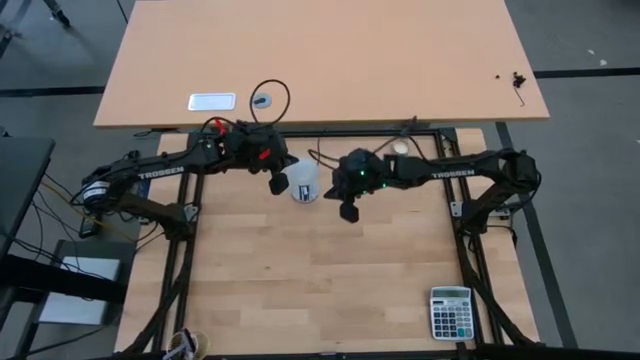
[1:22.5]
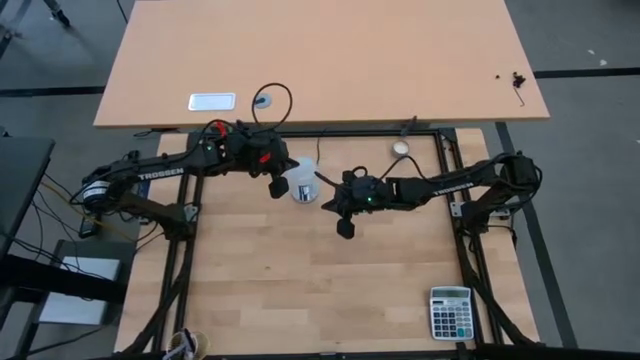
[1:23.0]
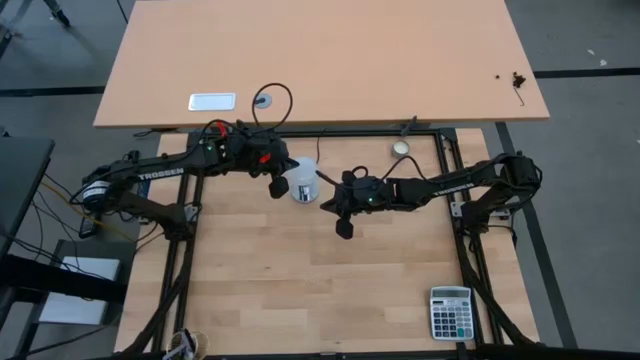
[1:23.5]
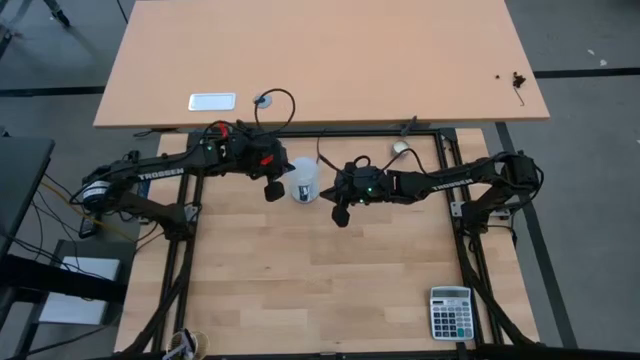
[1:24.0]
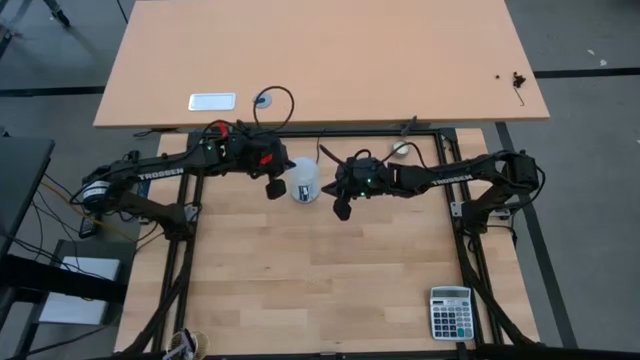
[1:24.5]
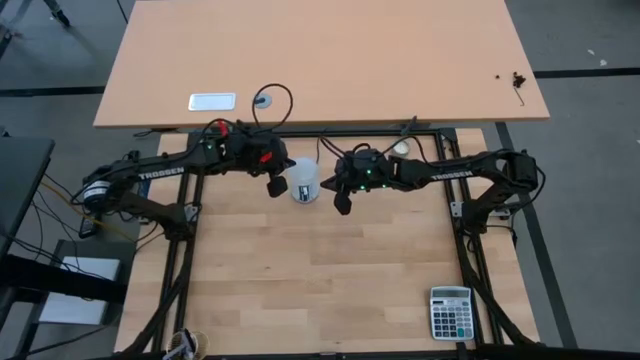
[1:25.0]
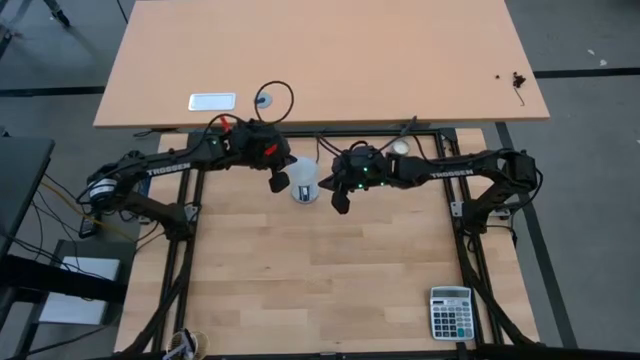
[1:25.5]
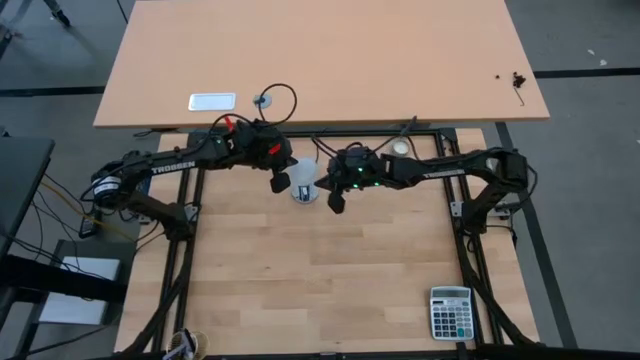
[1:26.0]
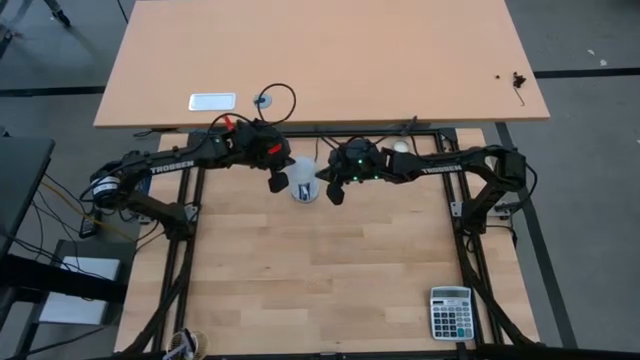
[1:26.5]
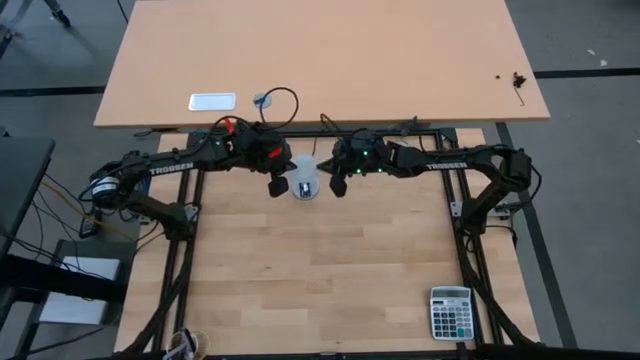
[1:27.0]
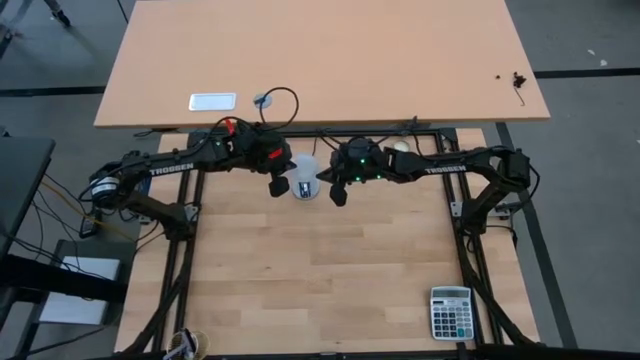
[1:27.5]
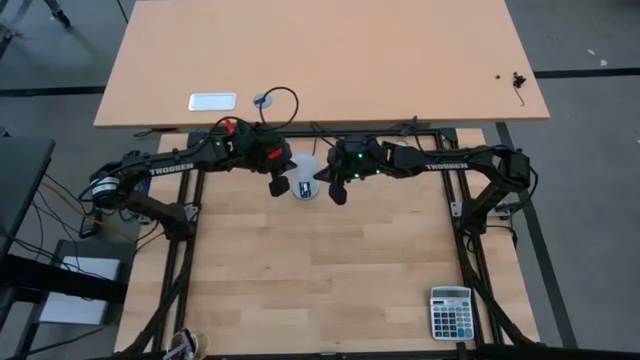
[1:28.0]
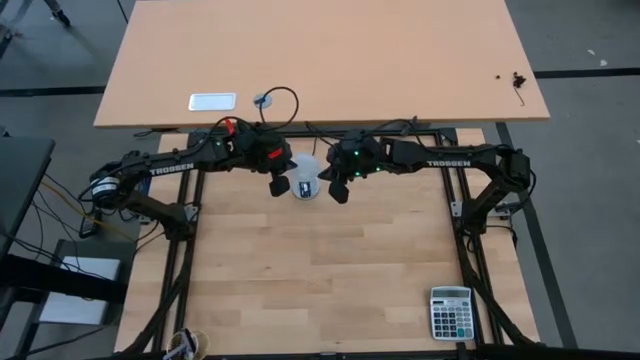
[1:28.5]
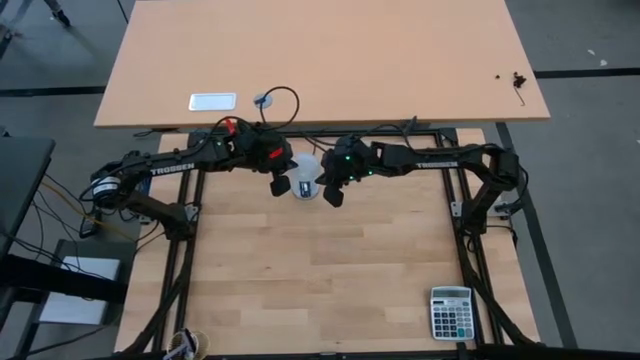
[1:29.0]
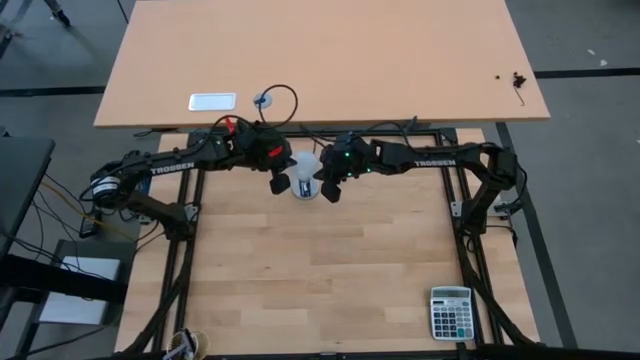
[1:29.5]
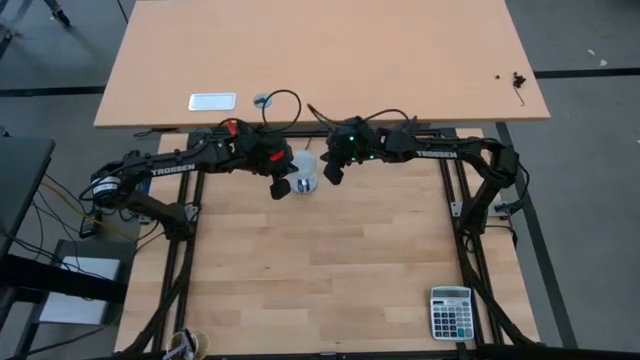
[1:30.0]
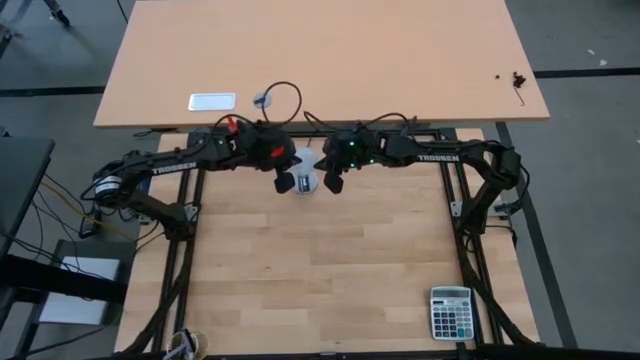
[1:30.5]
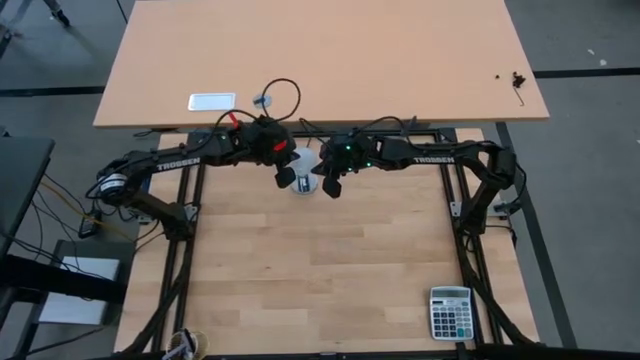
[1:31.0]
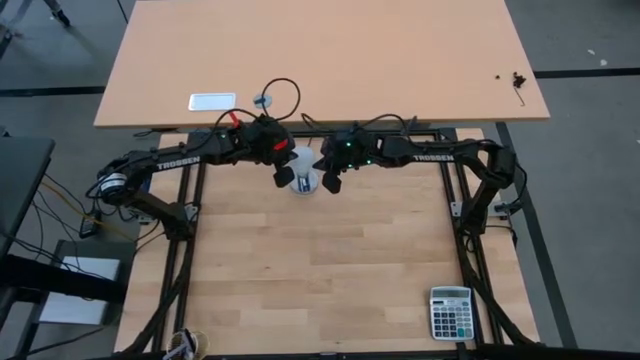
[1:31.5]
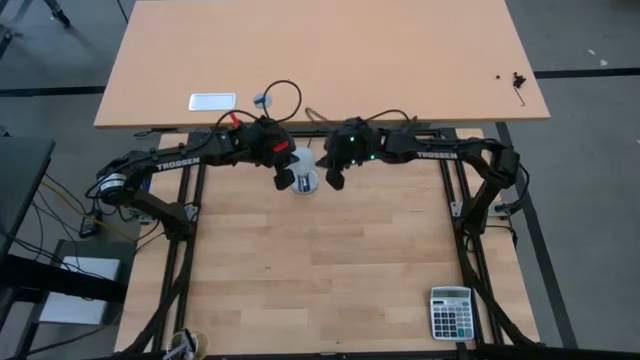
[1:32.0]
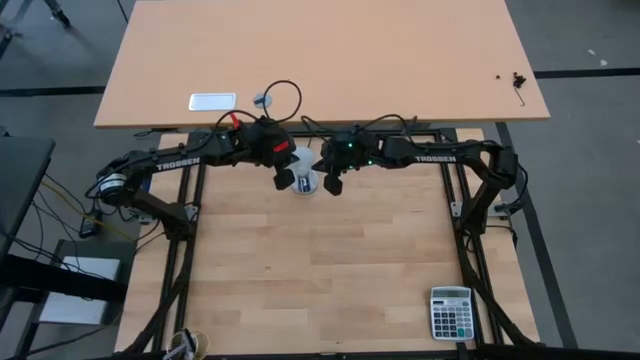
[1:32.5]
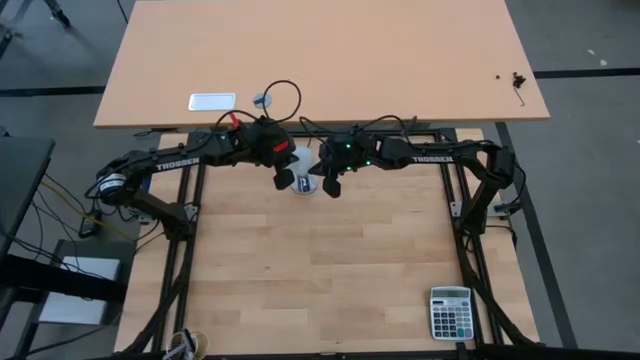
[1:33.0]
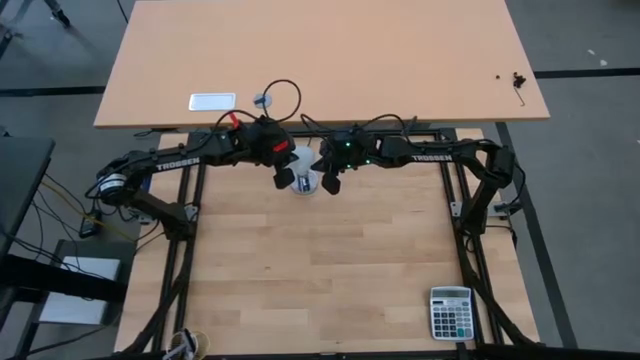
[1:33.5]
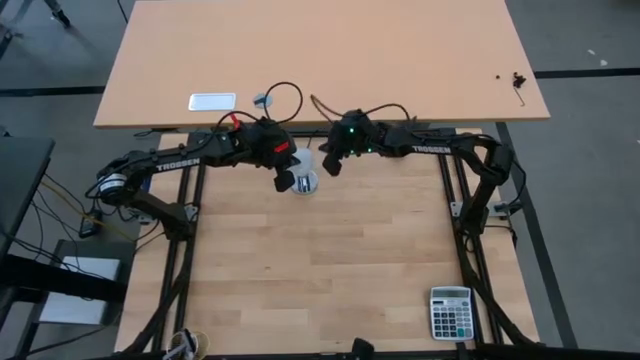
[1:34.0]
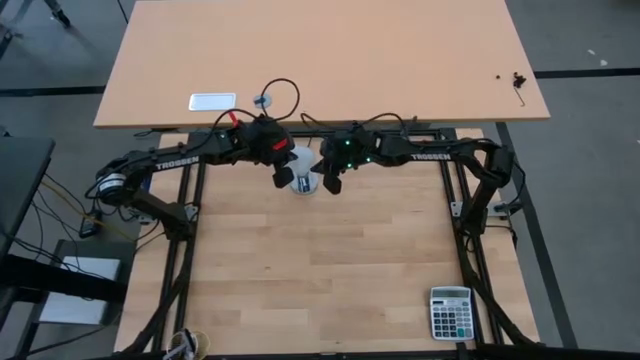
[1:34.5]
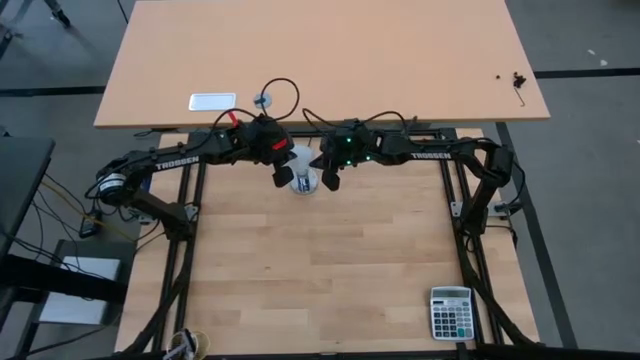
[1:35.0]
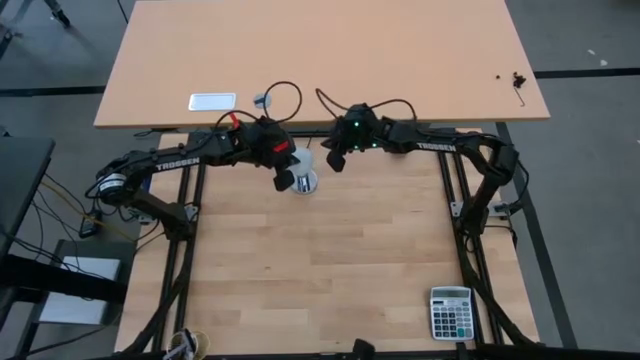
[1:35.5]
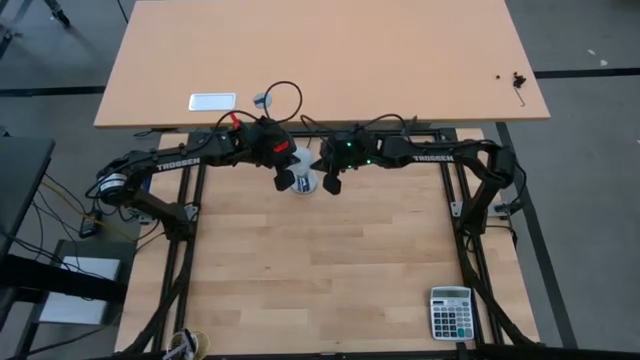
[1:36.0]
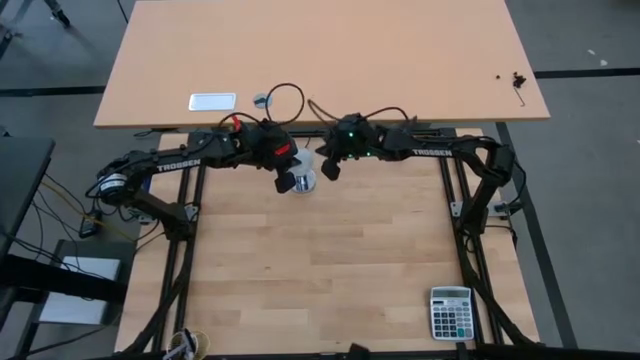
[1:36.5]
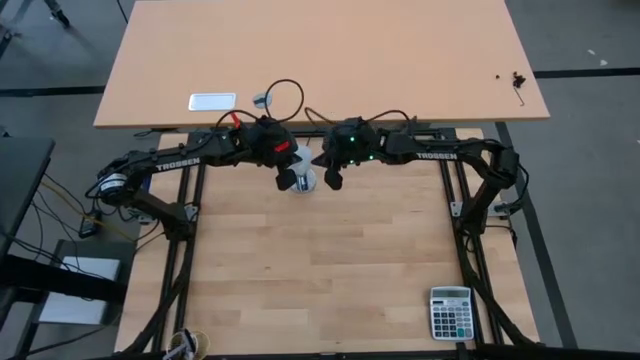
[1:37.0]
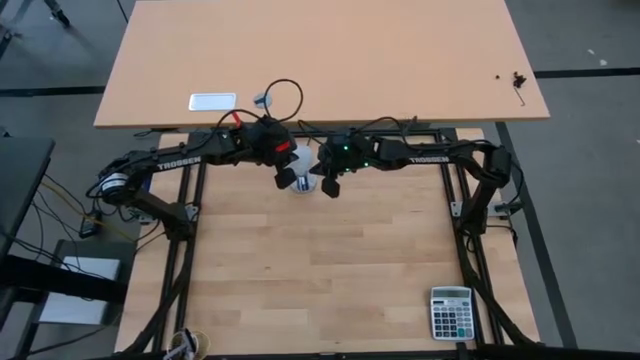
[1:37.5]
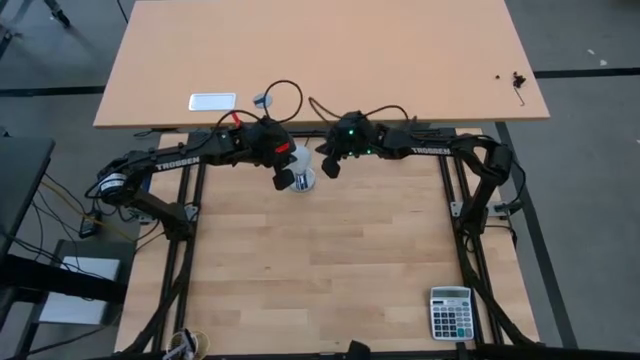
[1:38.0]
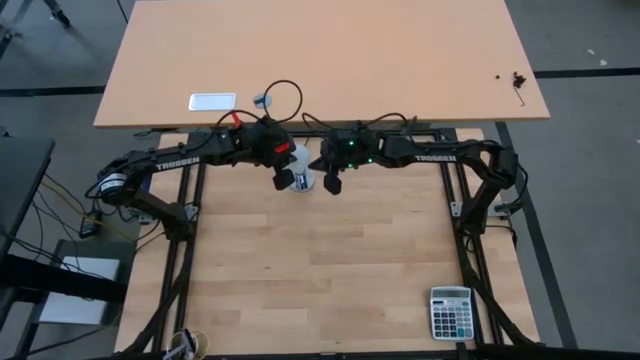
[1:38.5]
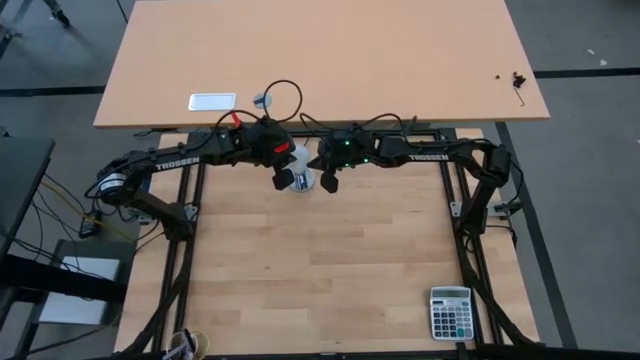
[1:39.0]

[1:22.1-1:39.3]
Task: Screw lightbulb
Remove the bulb from the lamp socket
